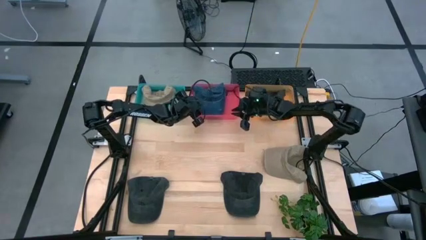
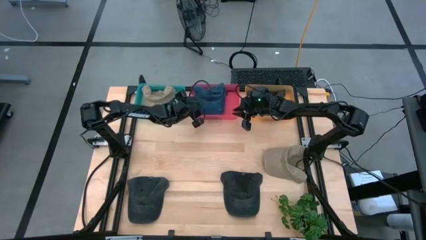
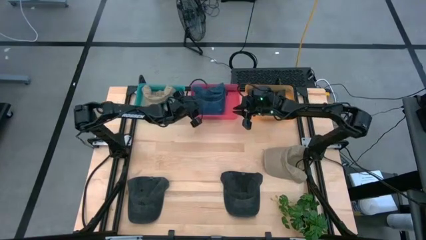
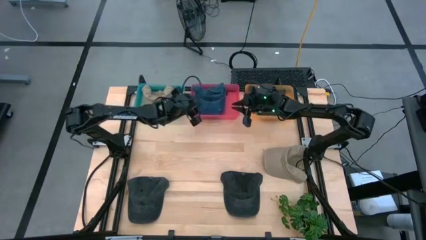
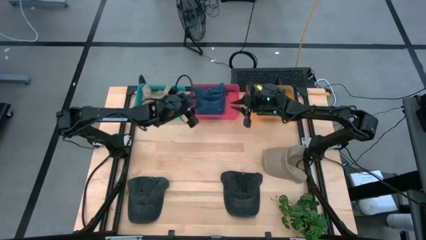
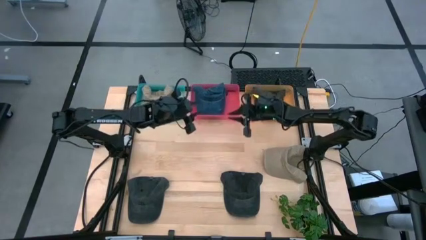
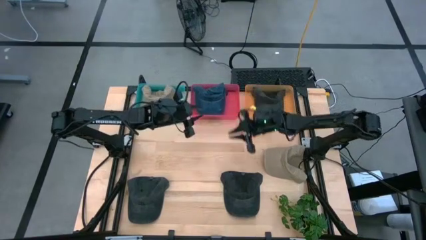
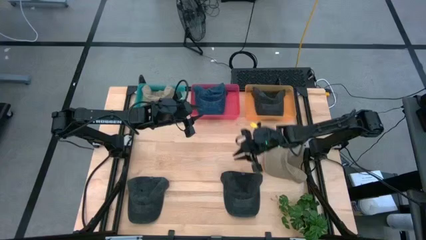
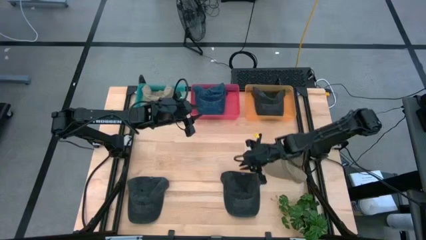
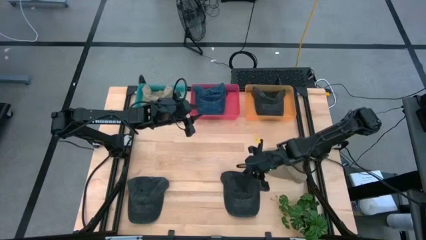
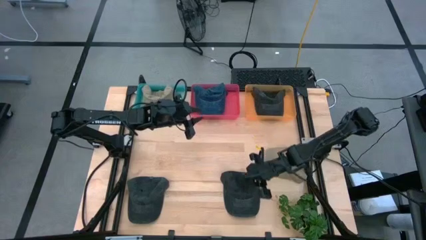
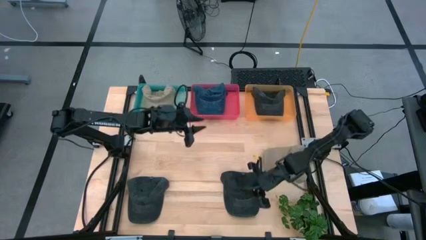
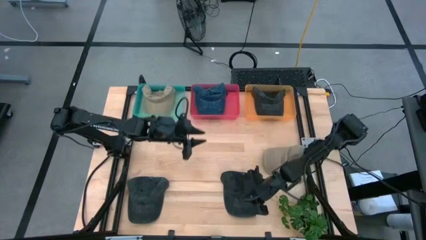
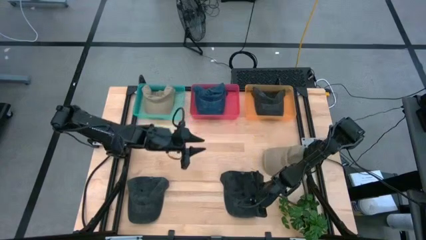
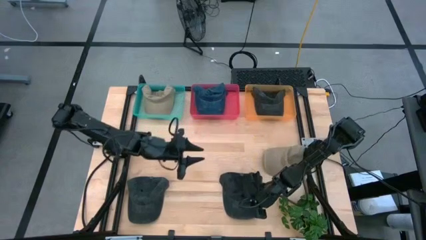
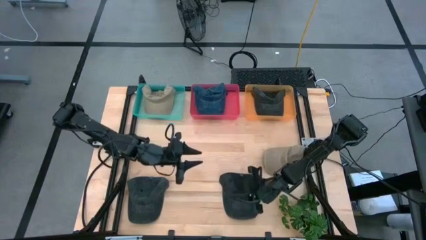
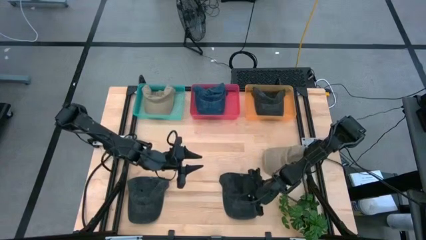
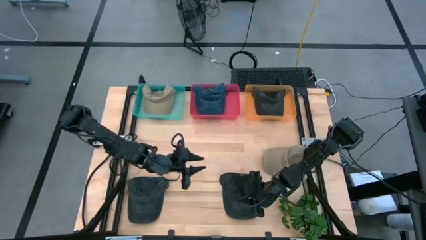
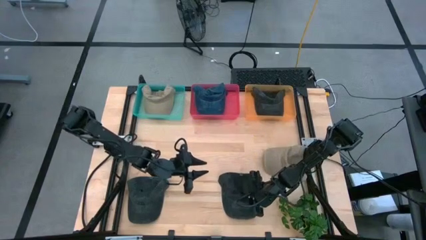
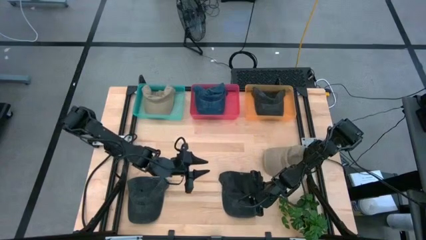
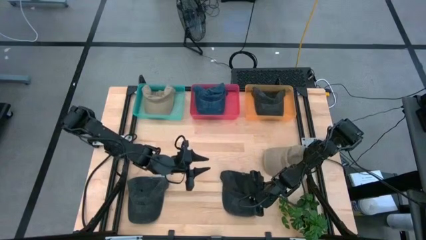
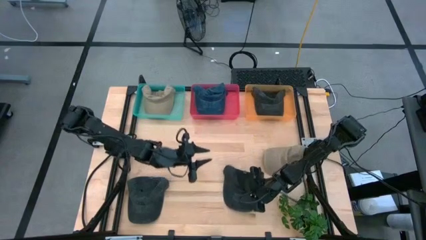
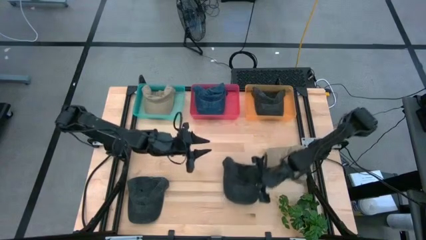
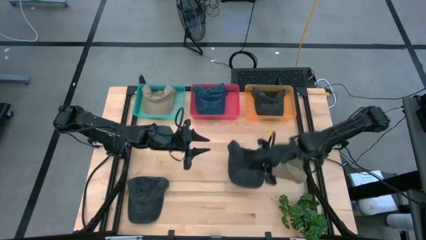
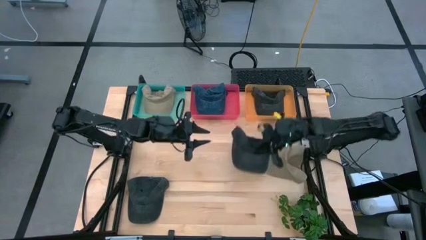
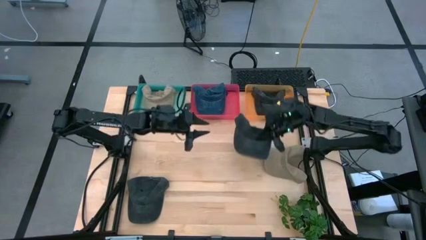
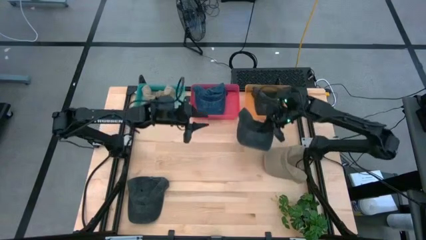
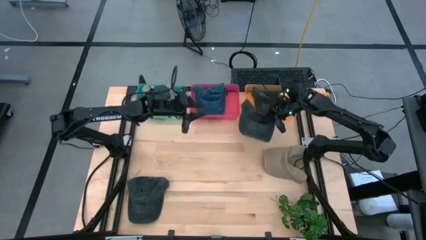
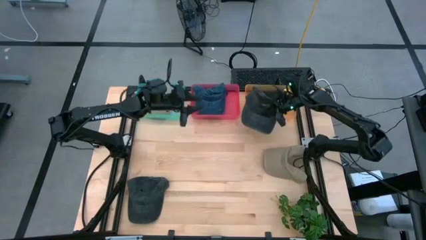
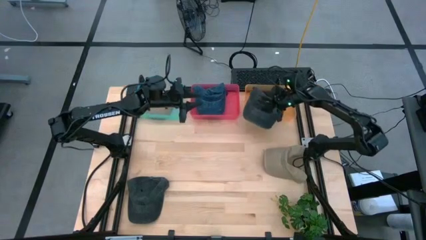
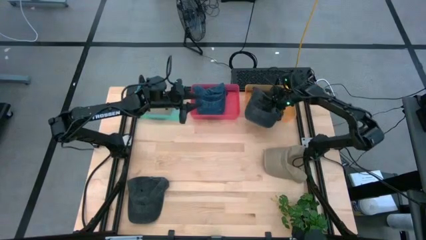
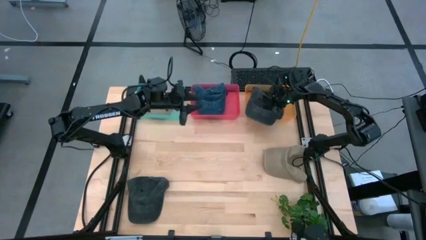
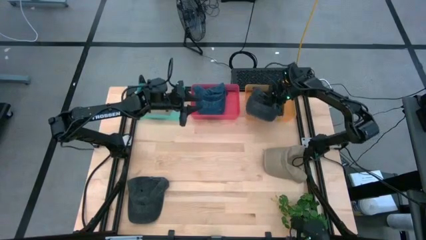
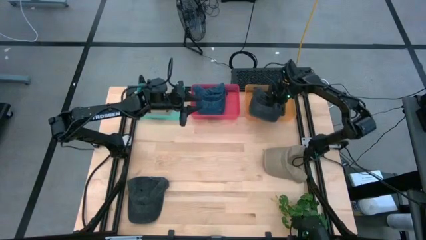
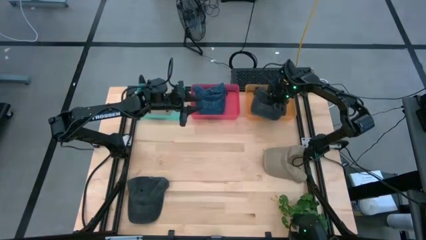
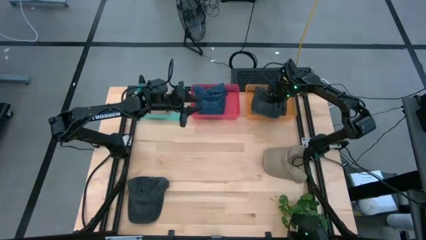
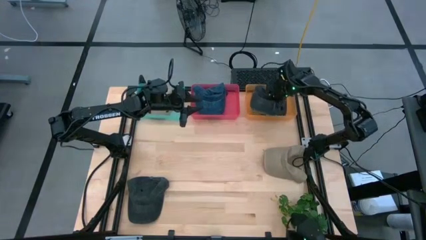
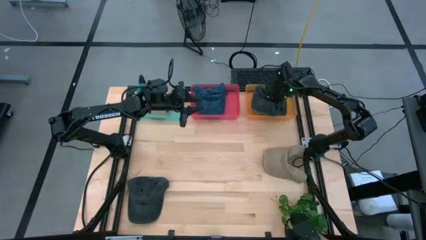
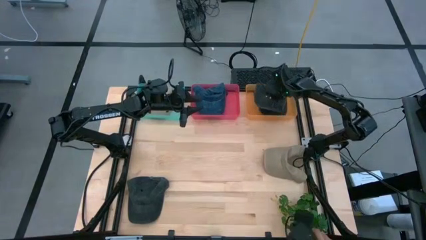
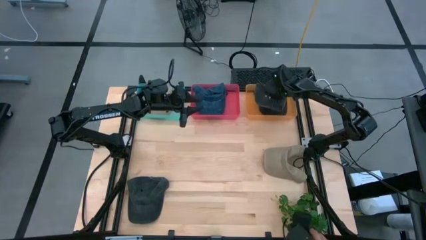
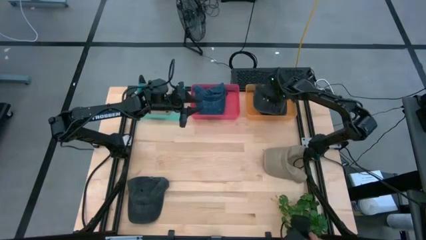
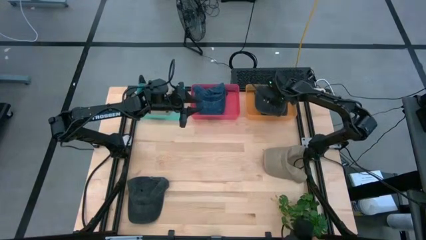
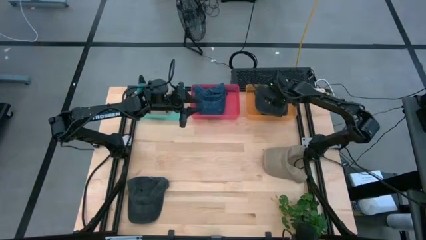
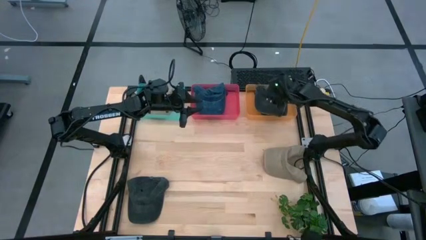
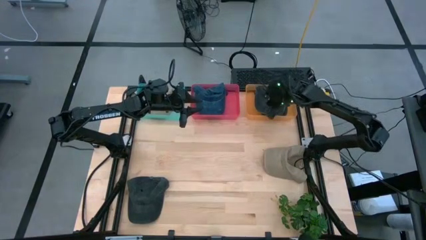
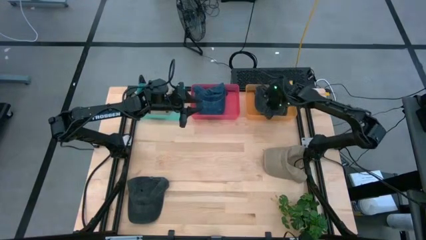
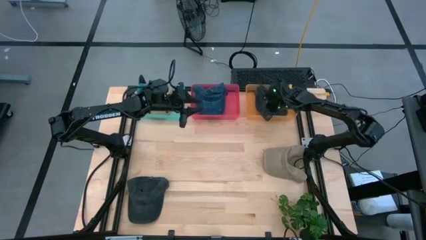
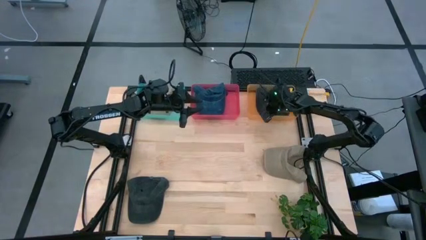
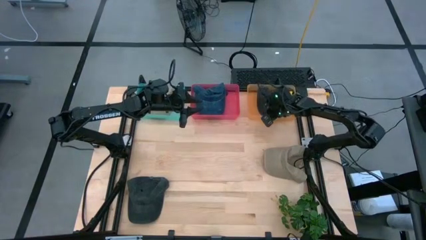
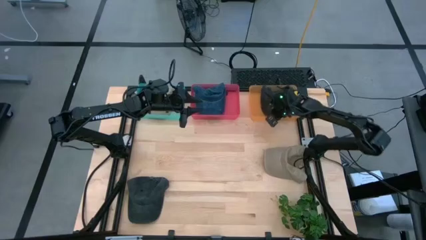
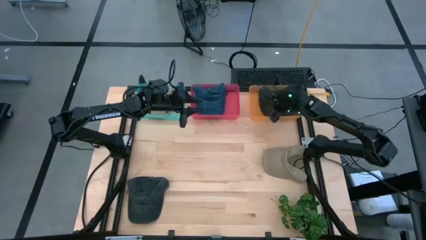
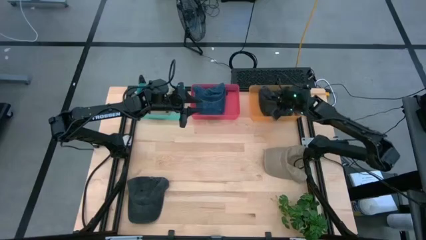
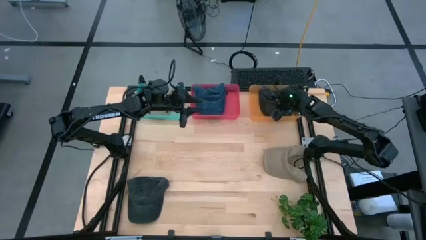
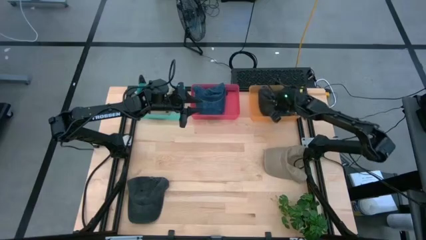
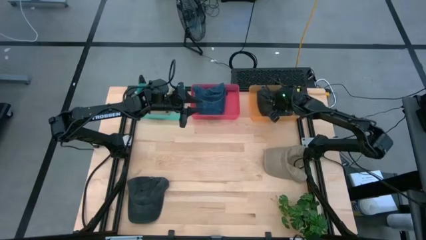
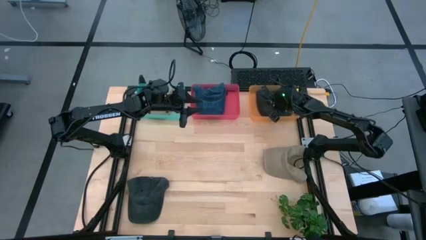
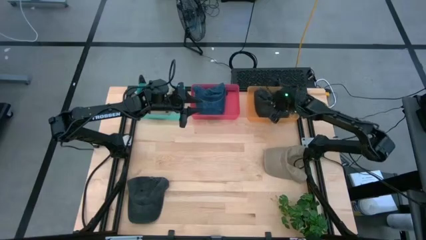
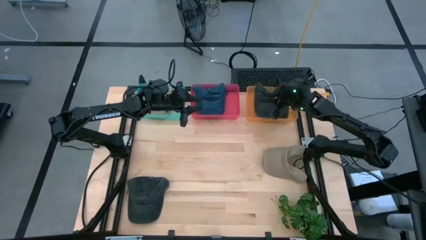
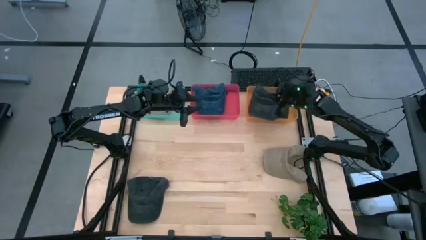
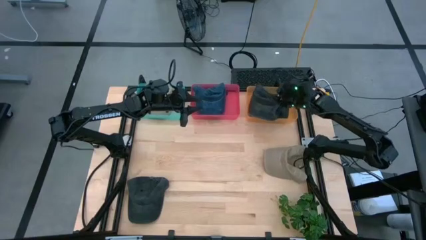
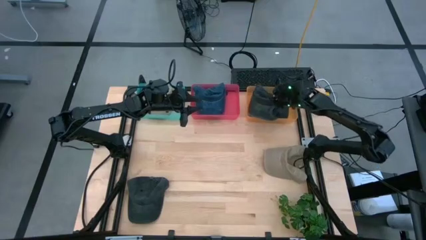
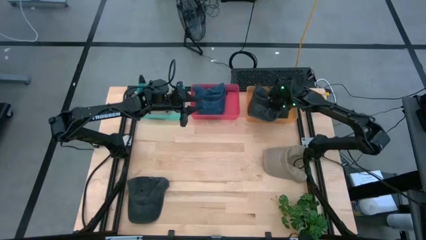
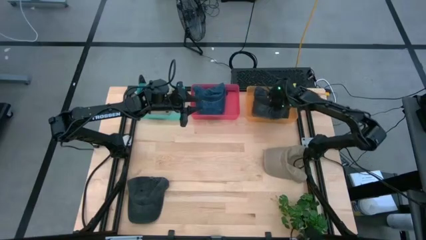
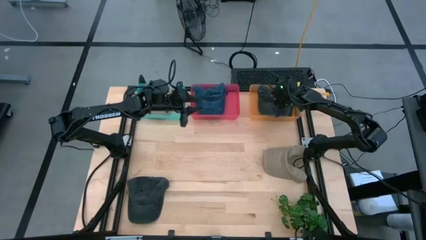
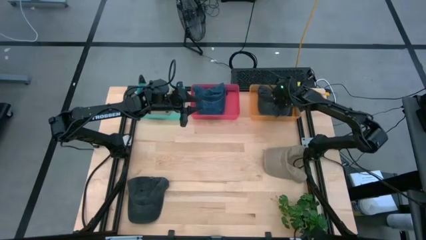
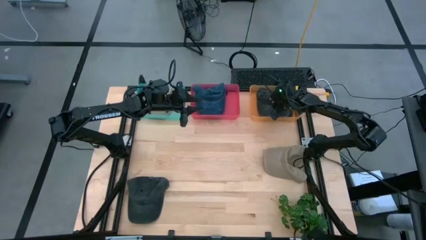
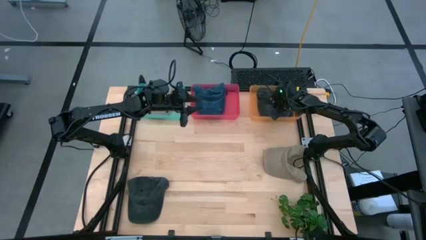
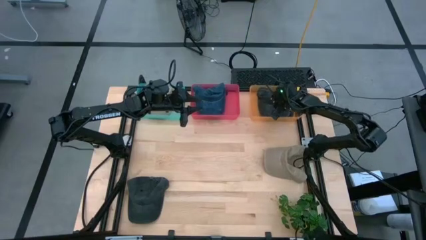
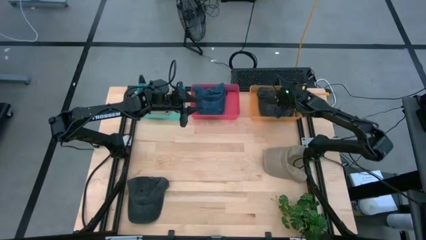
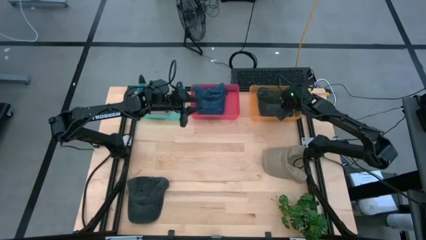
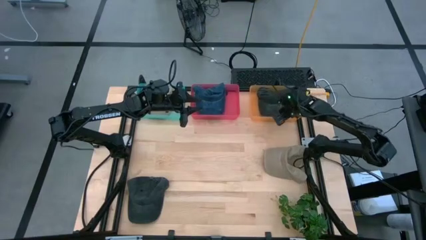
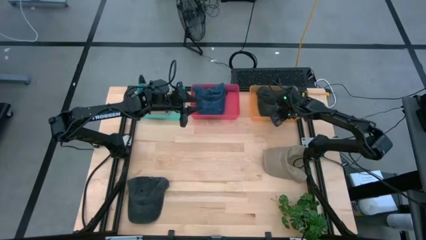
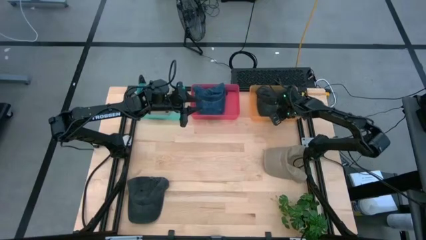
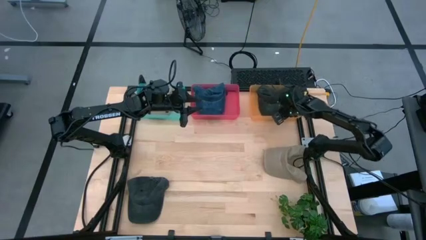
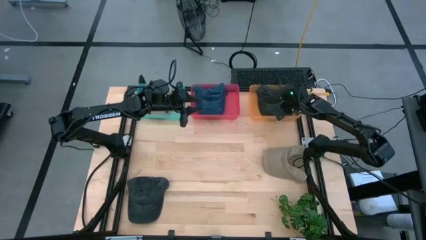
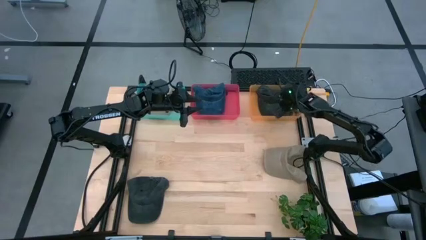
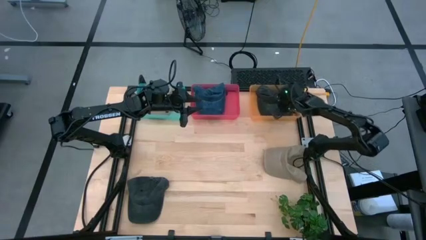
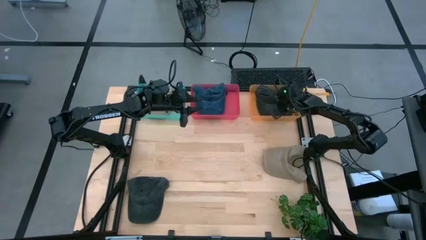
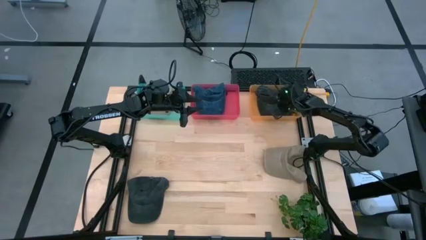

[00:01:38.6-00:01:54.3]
Task: Pick & Place hat
Put the right black cap into the orange bin
